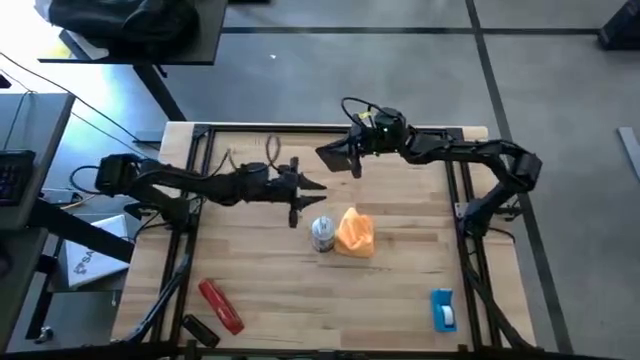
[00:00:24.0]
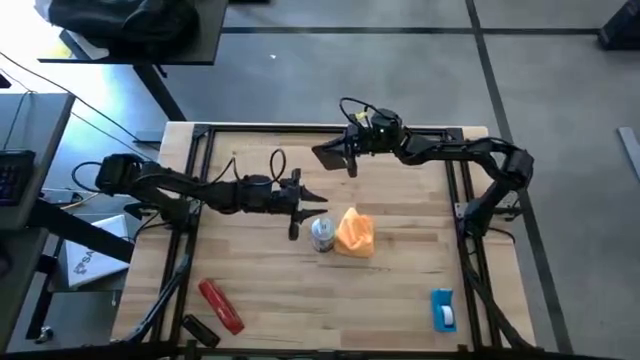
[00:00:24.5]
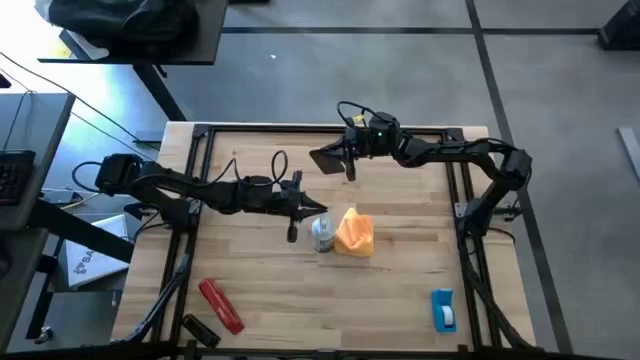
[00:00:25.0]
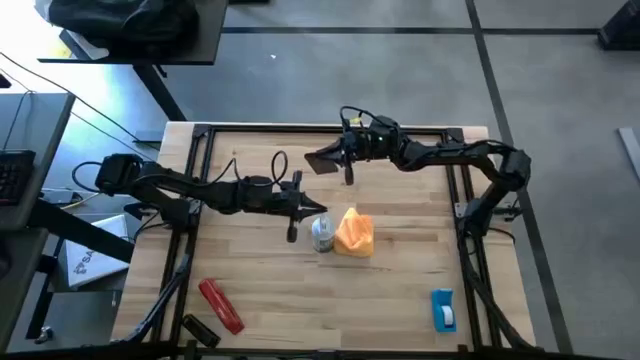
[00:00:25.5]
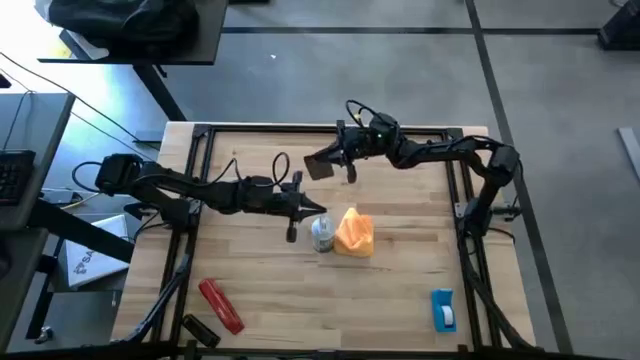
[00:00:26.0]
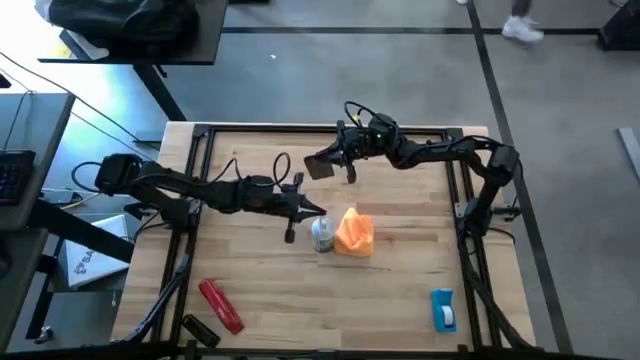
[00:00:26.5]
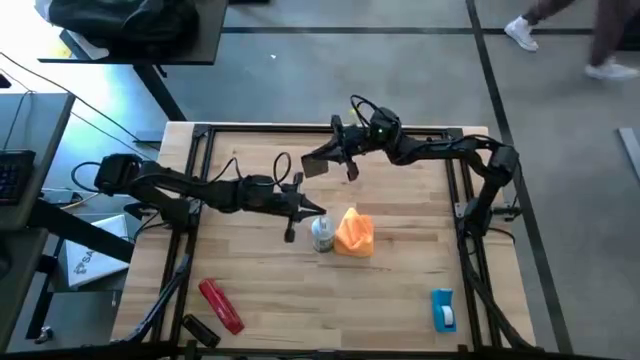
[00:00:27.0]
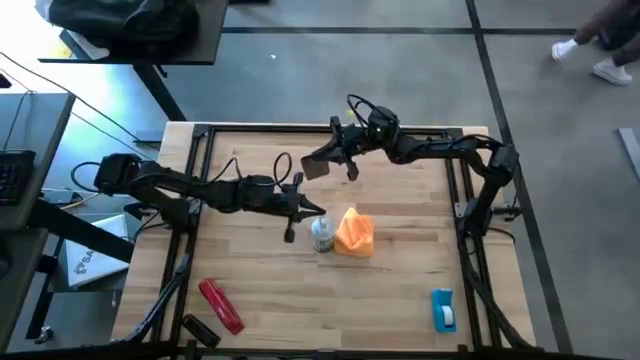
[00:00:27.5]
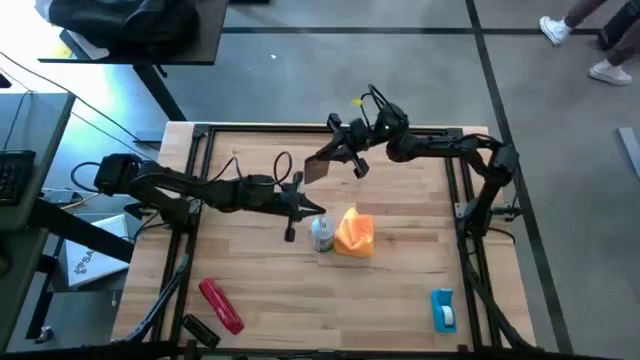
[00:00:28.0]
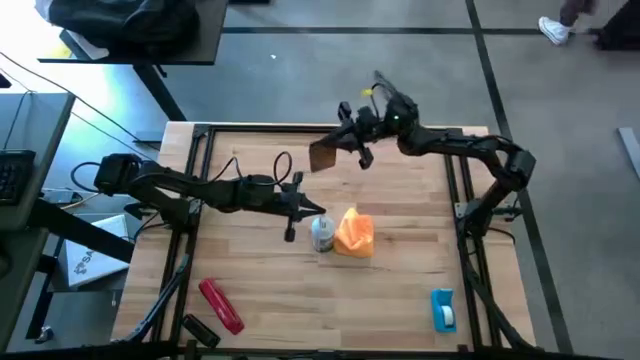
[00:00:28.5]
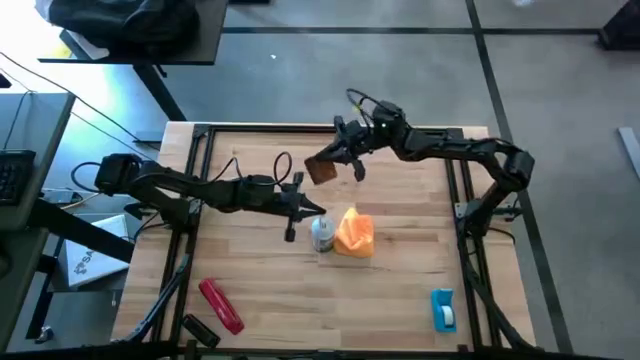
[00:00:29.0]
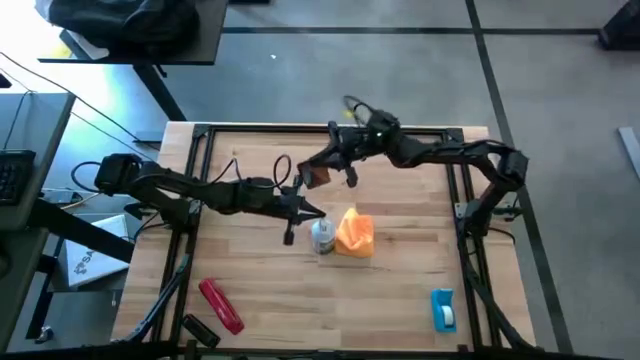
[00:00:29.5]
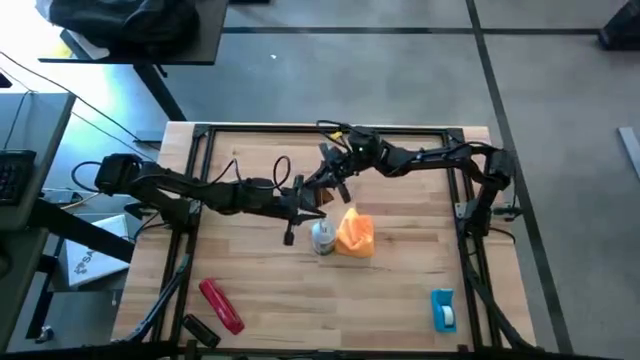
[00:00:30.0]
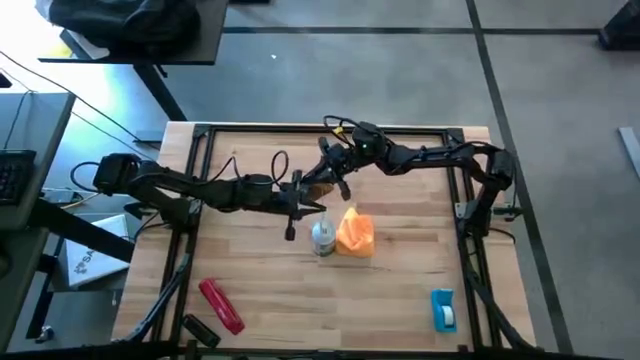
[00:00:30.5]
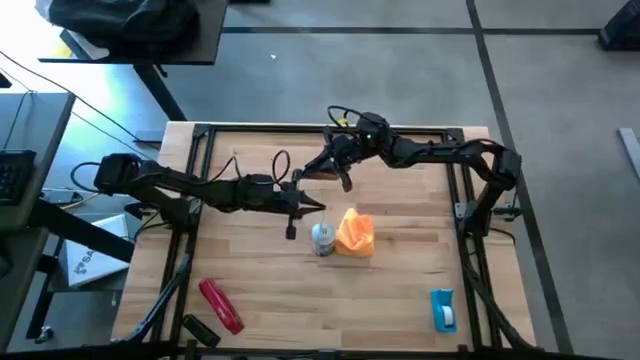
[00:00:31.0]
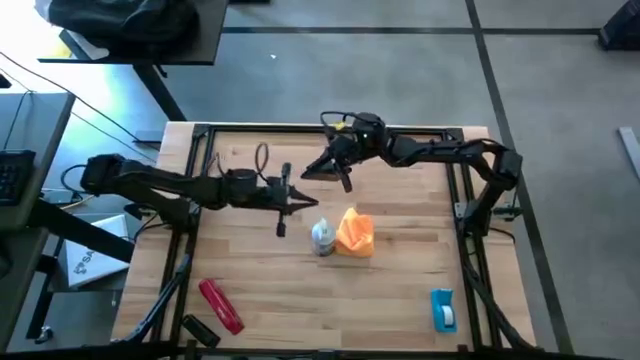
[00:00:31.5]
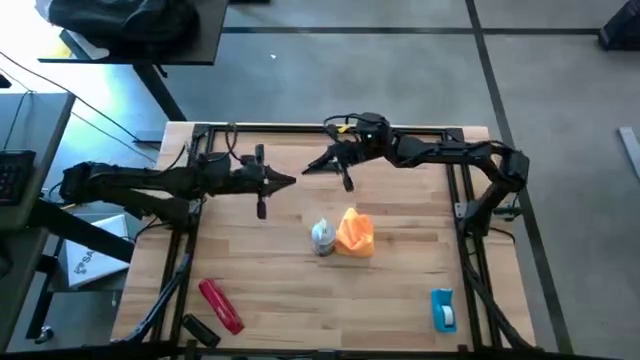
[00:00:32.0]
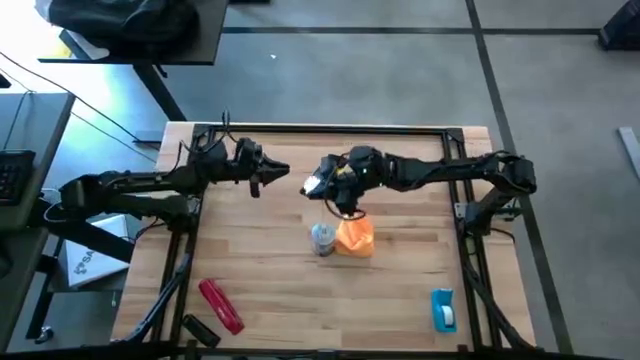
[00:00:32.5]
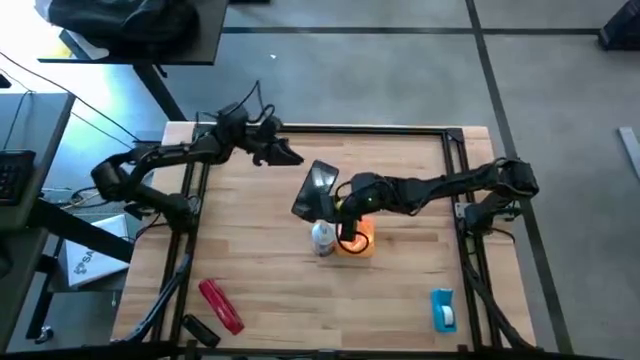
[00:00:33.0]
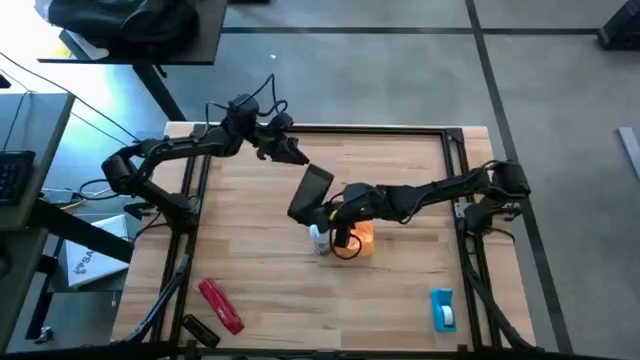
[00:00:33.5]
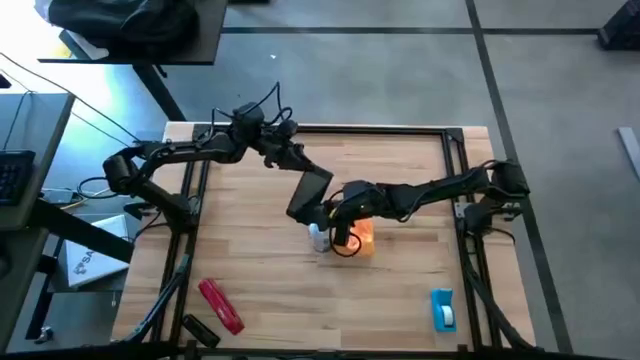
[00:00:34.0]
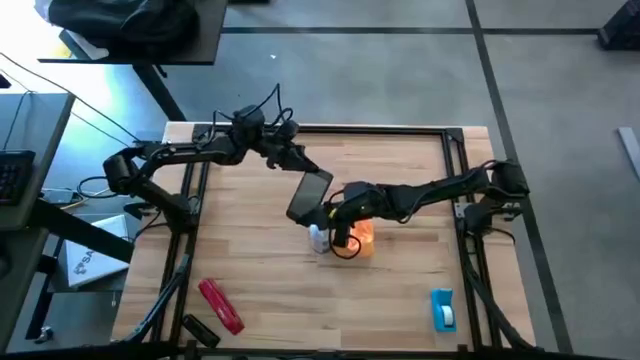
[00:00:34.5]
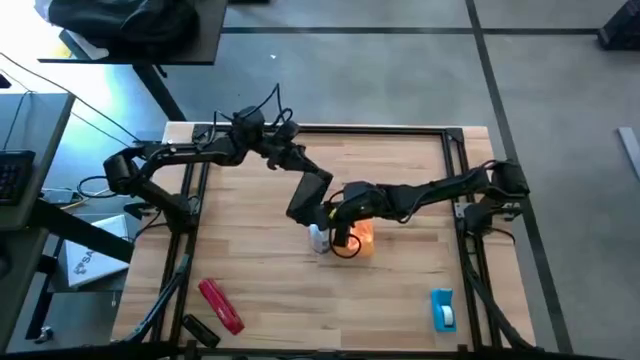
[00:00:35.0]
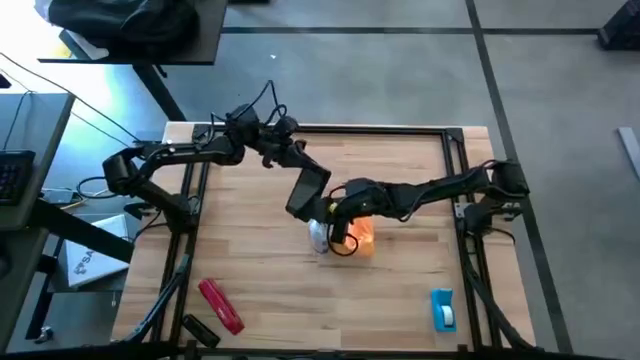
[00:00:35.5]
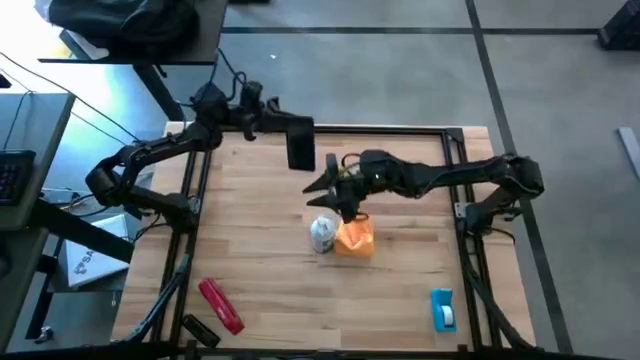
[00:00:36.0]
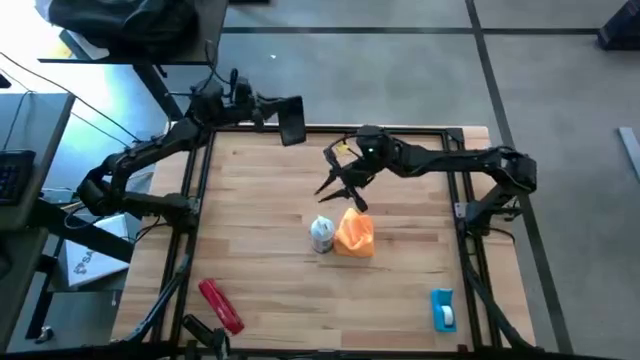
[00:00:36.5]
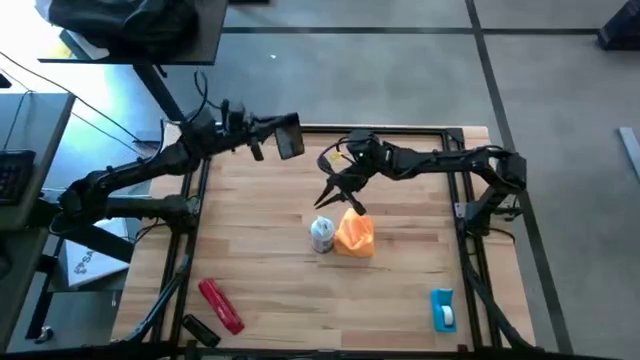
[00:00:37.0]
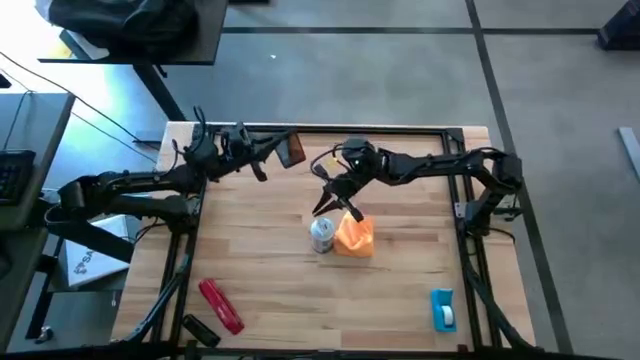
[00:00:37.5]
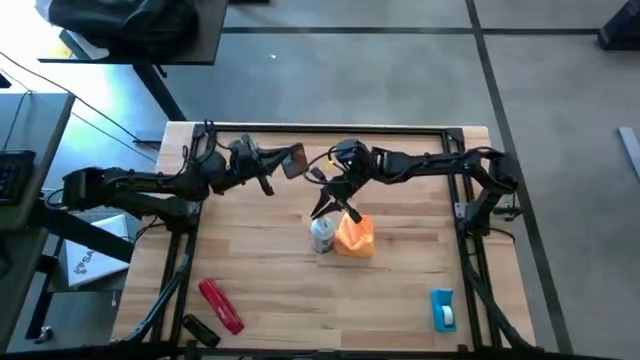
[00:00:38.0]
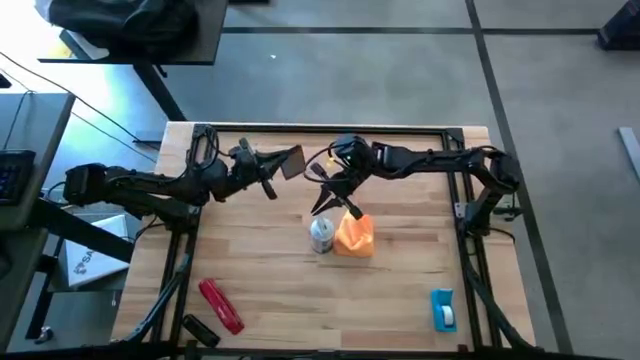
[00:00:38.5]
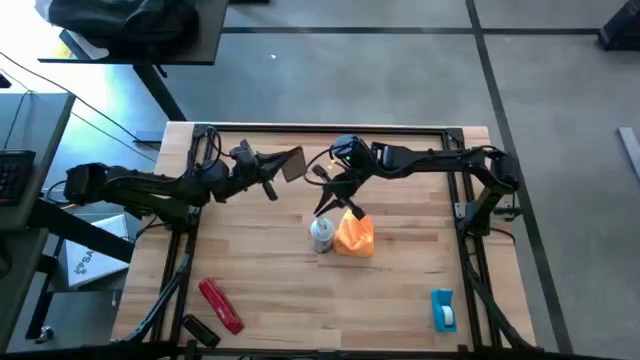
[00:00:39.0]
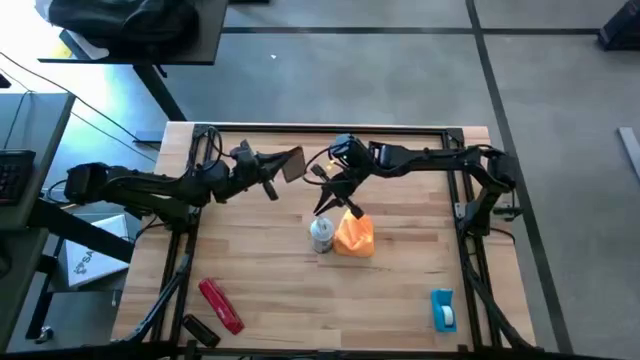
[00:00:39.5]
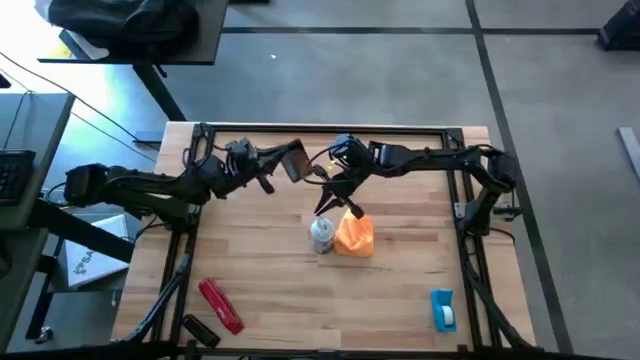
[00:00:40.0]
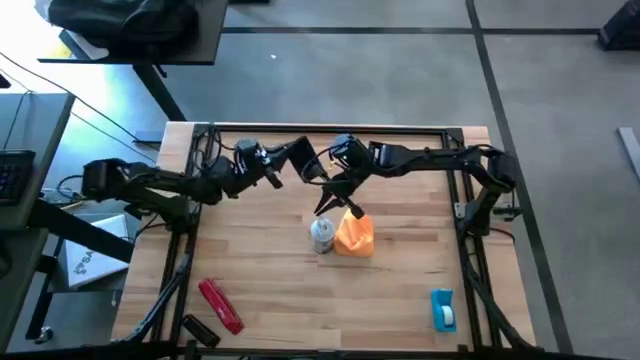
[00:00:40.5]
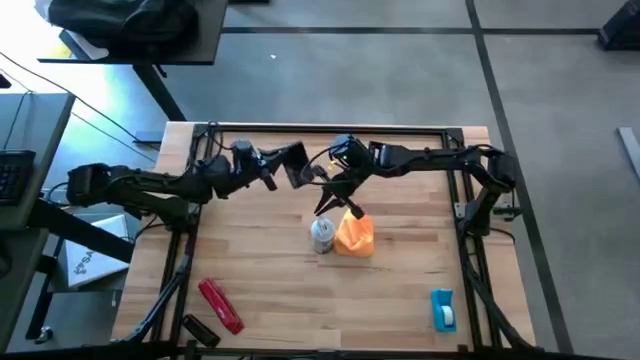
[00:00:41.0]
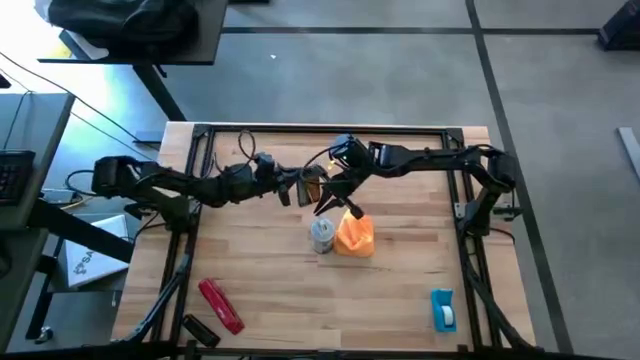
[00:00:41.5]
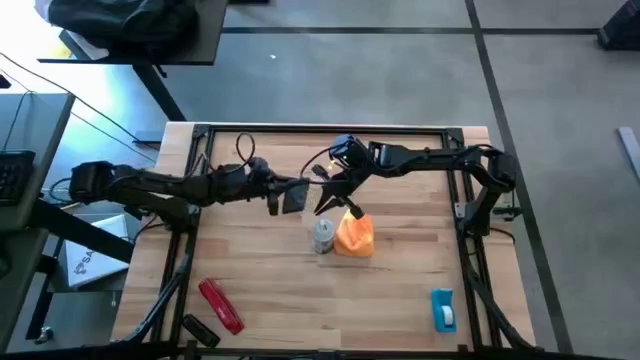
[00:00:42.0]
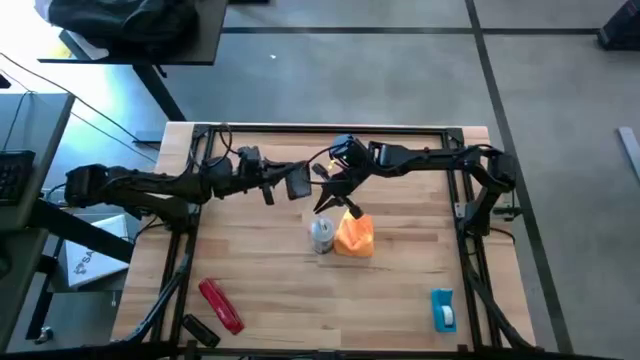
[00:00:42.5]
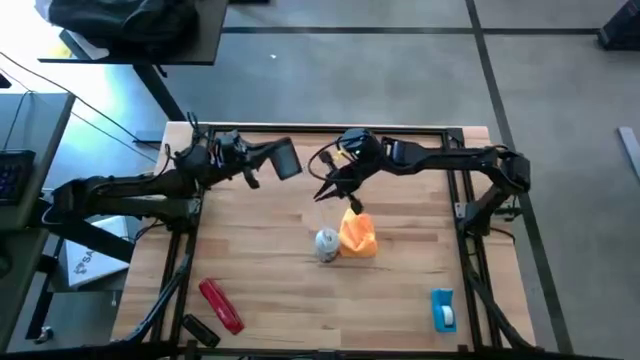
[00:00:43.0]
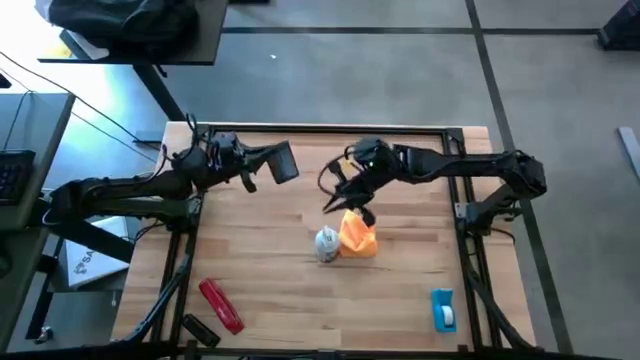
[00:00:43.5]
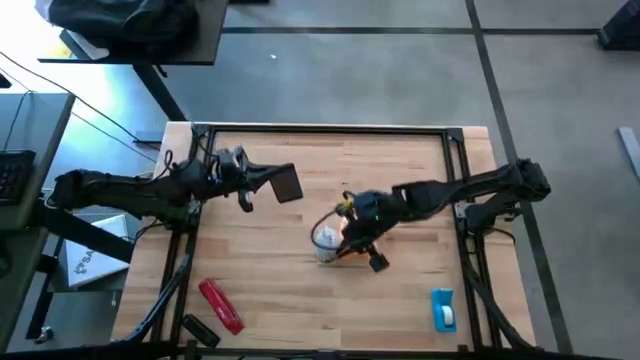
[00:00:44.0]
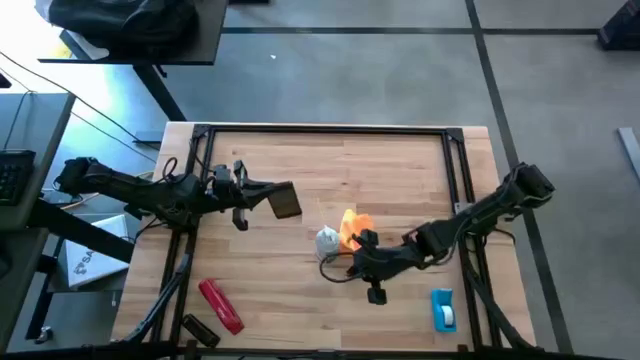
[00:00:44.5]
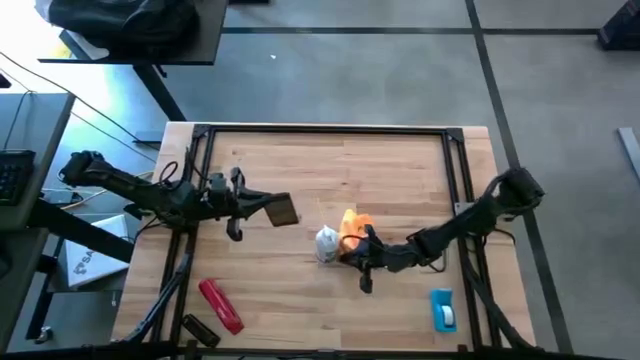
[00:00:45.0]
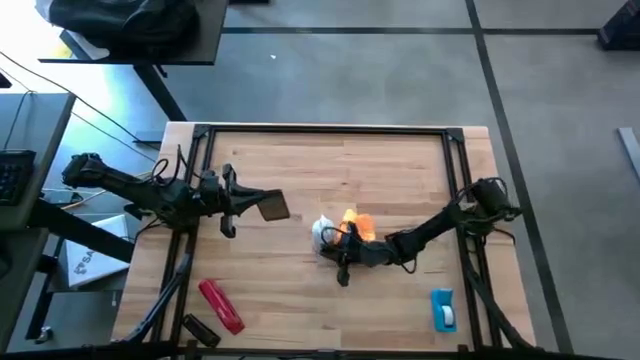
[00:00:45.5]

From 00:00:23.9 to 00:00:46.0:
Task: Apply microfiber cloth
Spray the front and back of the black cellphone using the white spray bottle
